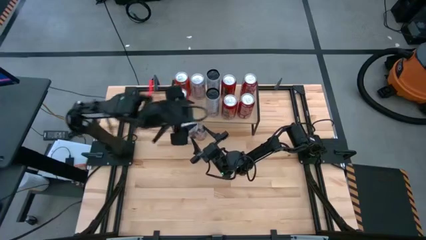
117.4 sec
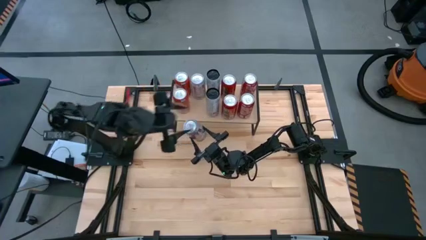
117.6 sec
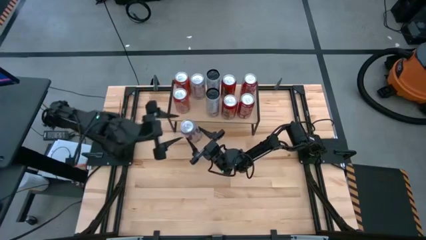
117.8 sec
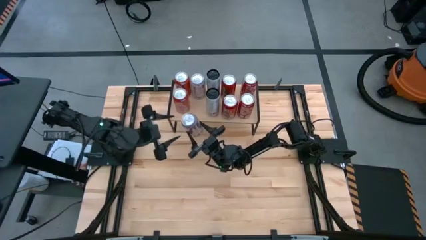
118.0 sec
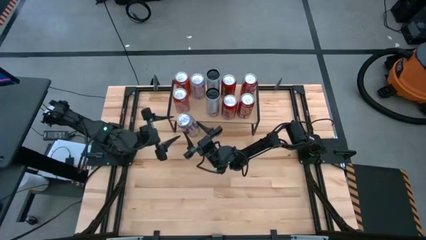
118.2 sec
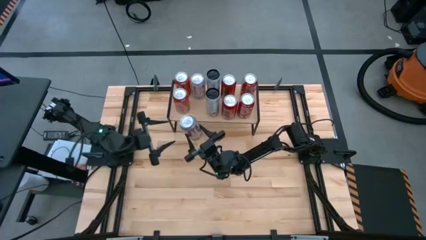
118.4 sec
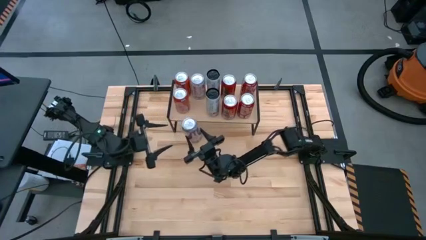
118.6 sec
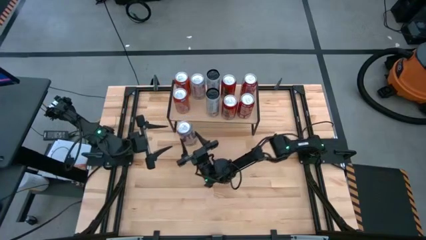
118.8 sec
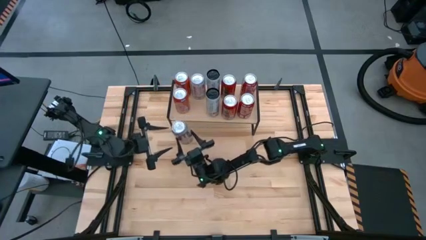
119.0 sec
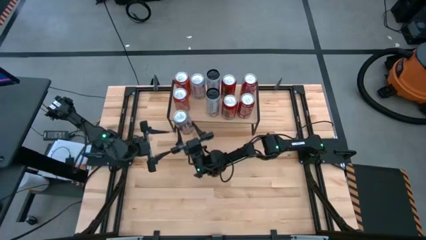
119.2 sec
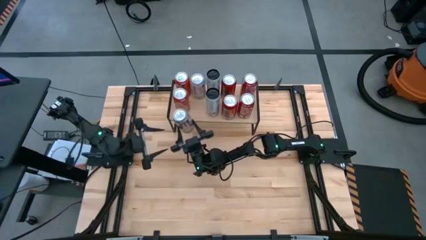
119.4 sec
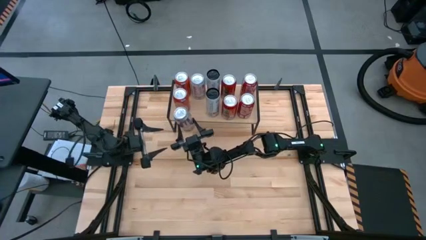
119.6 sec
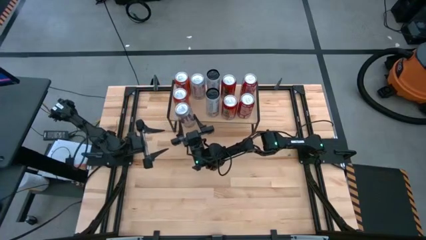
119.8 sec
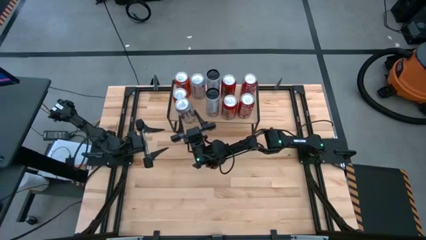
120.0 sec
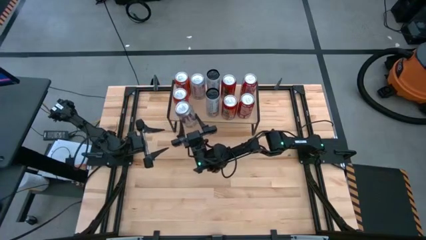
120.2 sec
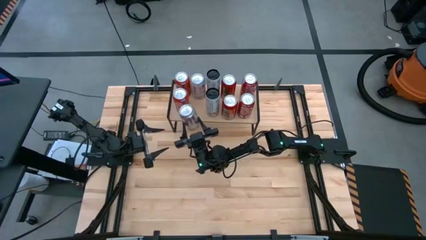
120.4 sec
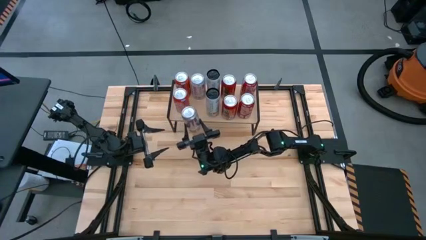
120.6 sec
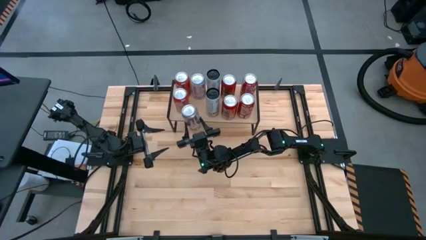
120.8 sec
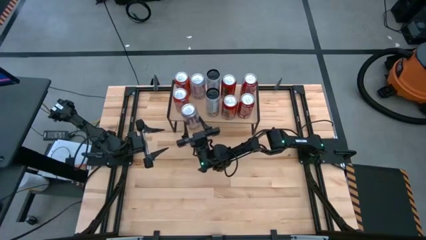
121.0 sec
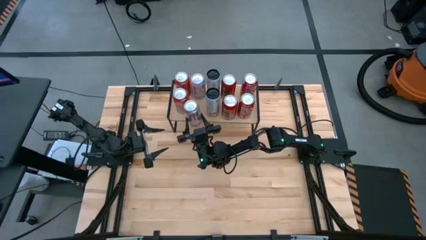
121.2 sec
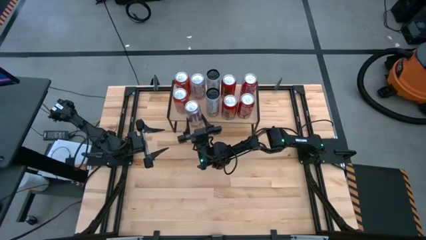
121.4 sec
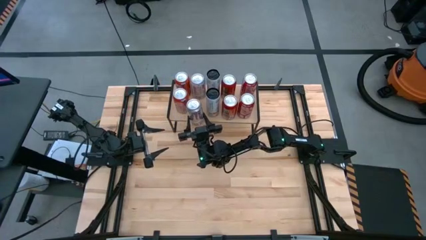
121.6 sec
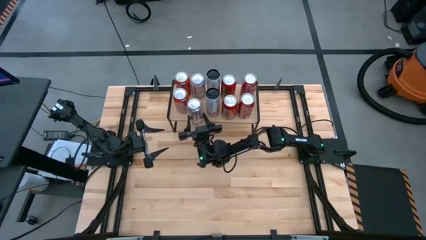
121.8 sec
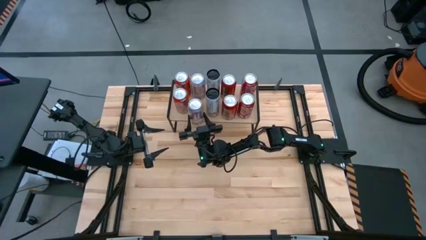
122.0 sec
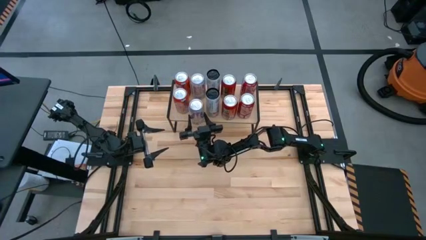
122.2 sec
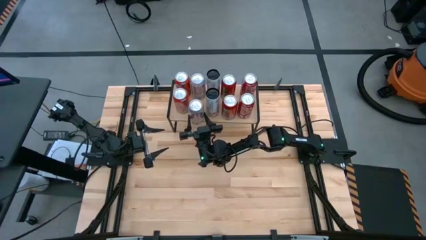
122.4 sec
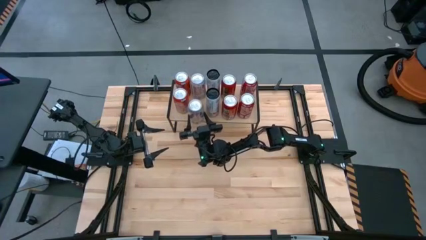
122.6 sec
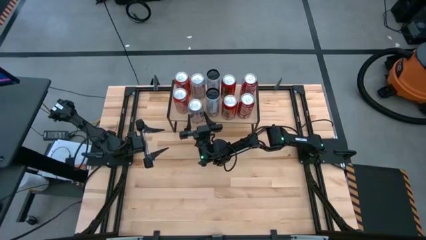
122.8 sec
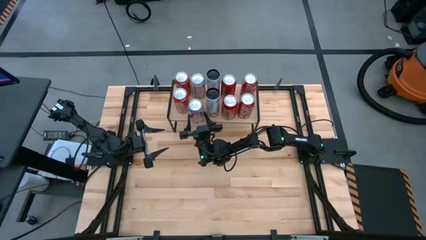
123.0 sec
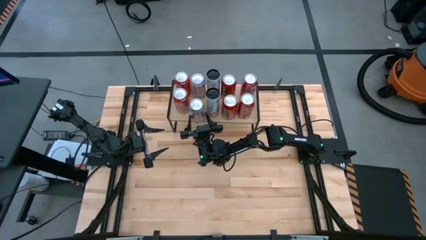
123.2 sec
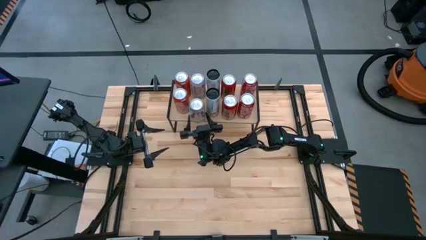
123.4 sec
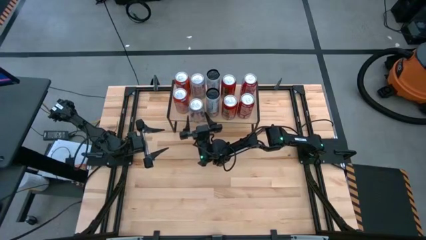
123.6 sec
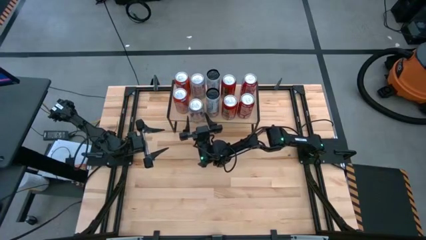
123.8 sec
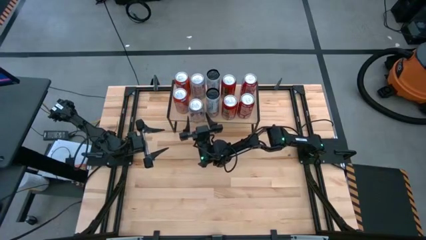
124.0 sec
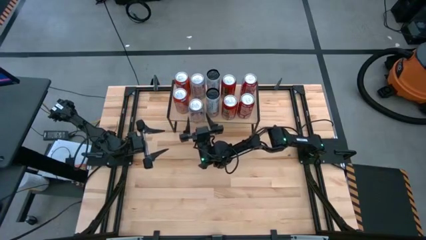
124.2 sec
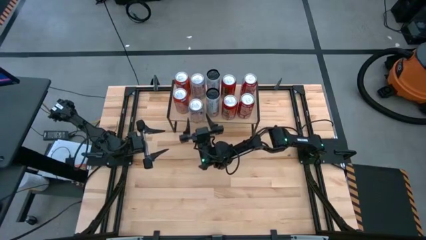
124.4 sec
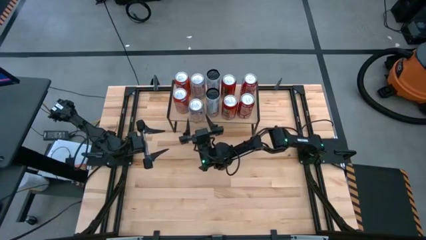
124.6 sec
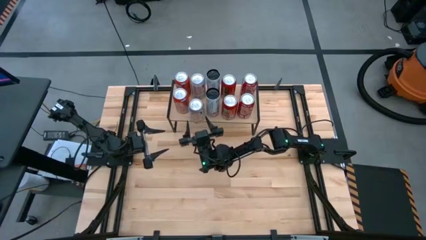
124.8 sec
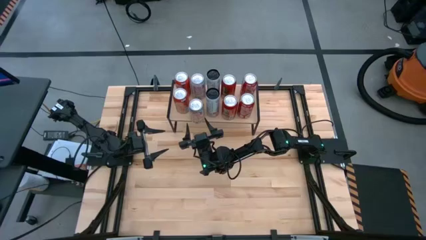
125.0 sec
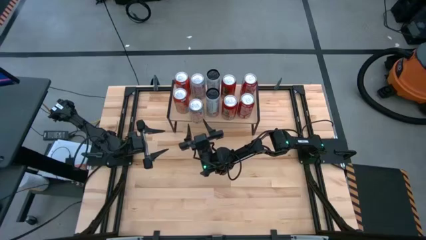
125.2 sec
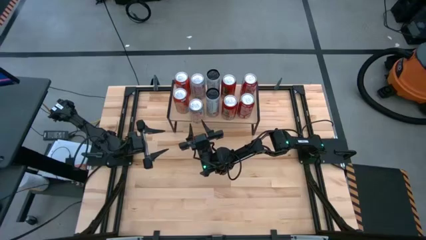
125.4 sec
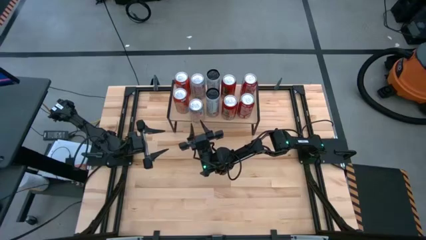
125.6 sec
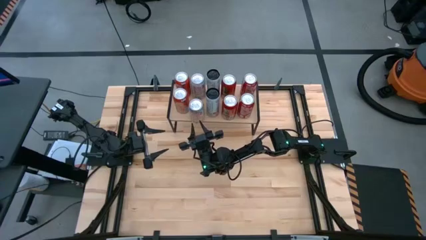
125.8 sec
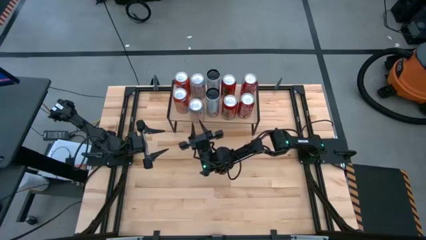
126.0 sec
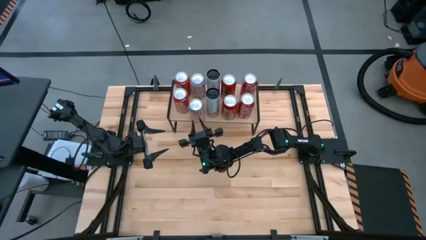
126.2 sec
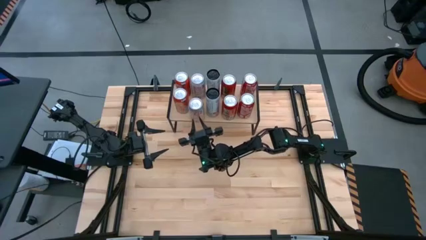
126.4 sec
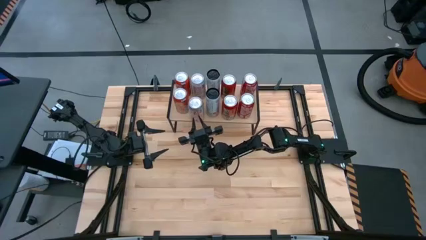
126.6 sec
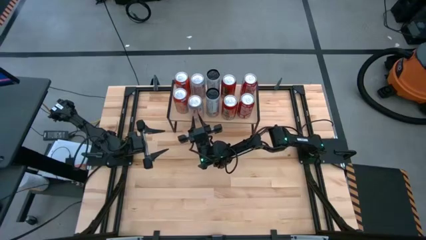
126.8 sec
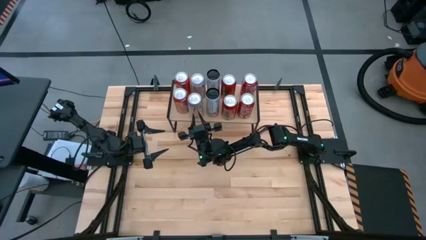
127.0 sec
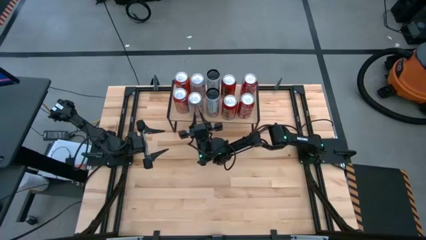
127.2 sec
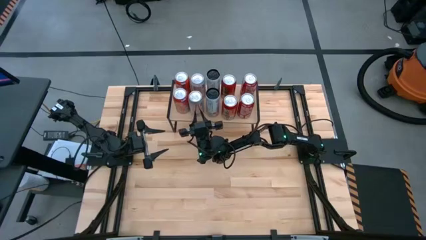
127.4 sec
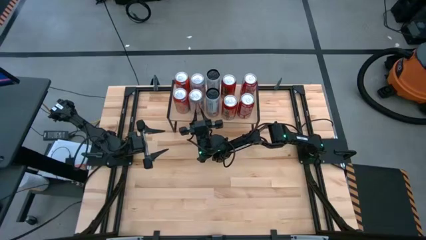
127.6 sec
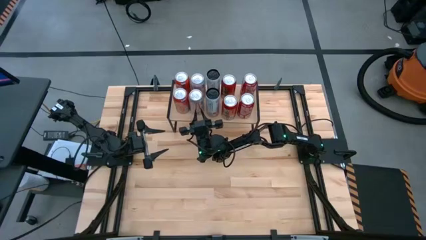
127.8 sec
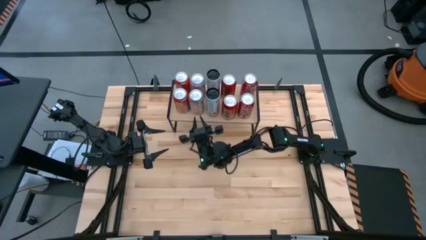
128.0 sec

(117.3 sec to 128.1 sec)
Task: Place canned beverage on shelf
Put the silver soda can on the shelf

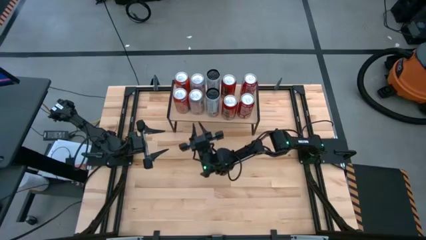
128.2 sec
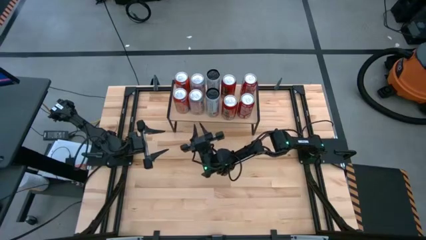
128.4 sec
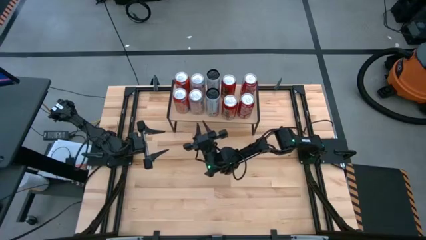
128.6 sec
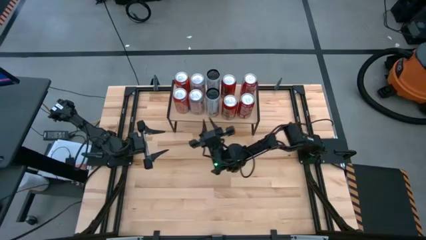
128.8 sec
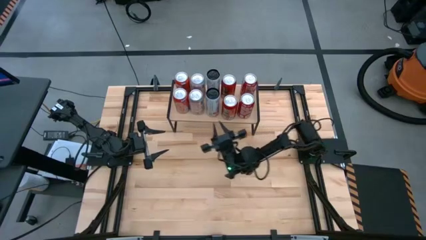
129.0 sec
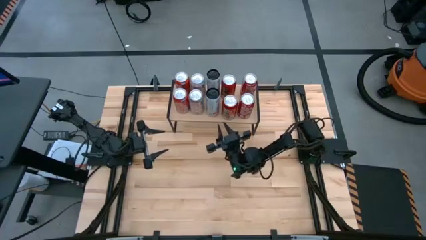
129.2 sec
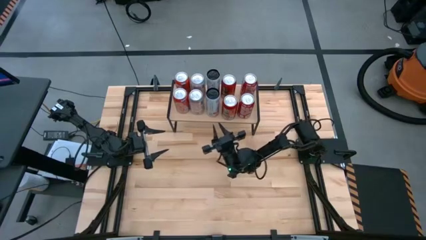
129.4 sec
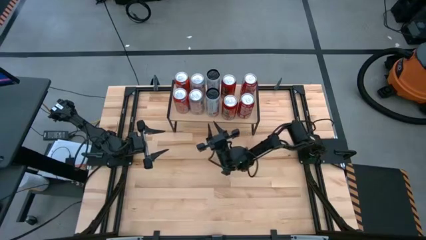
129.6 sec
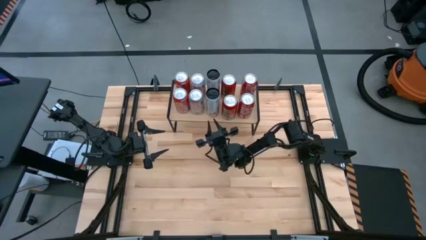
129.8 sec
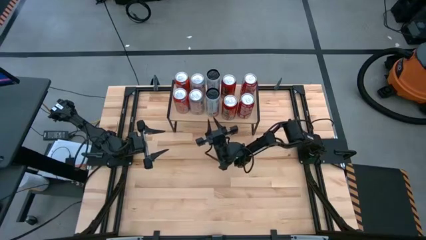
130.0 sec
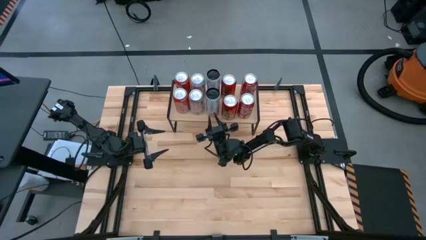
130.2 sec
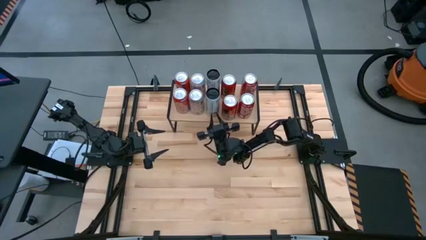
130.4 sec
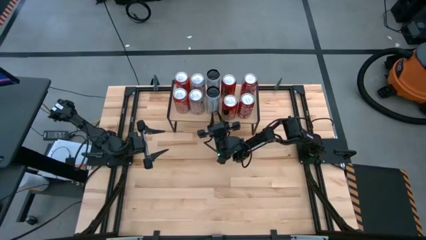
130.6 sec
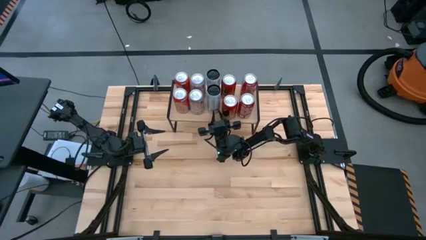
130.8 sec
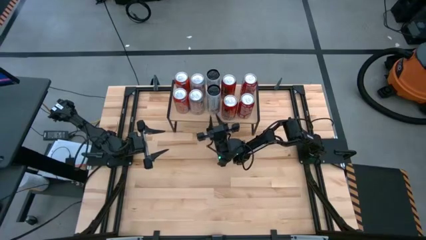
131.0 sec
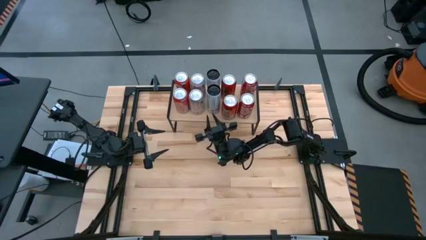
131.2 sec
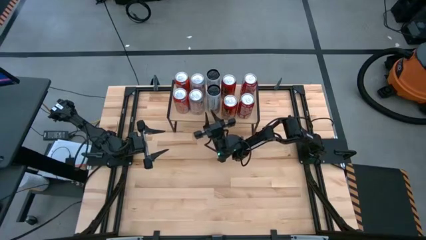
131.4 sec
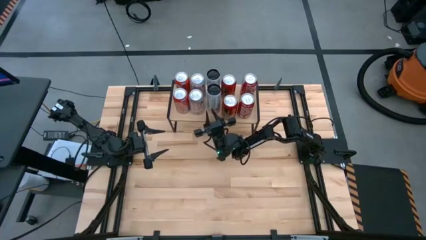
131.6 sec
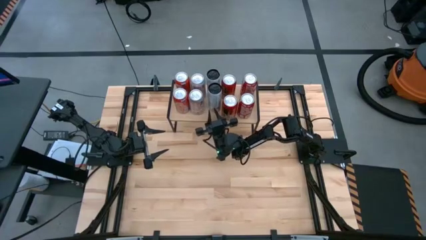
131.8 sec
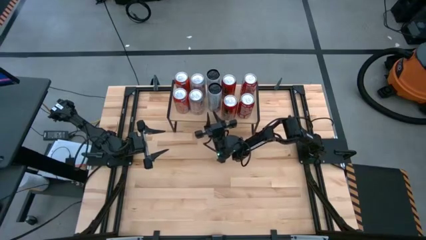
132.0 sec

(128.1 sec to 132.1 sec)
Adjust the bottom white soda can on the shelf

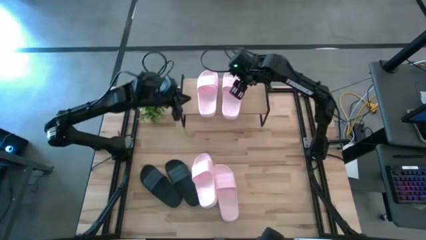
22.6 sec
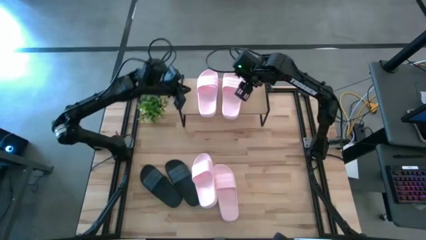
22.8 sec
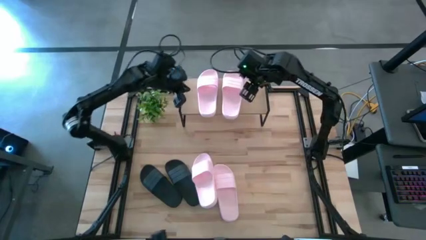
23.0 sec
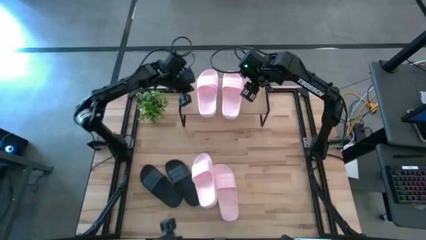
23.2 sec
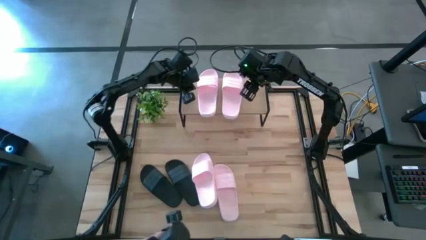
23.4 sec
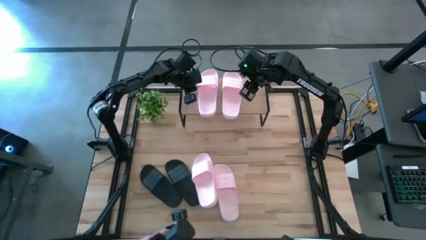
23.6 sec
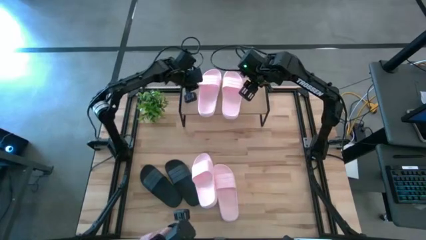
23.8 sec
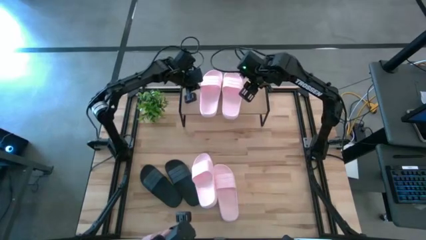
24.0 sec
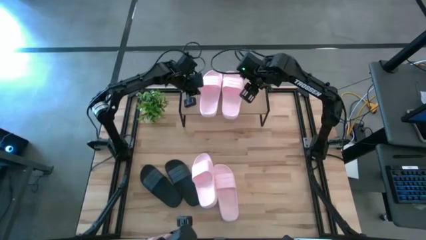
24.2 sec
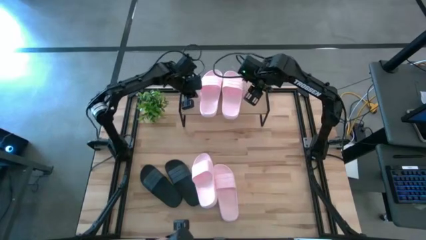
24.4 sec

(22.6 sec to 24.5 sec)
Task: Pick and place slides into the shelf
Adjust the left pink slide on the shelf
